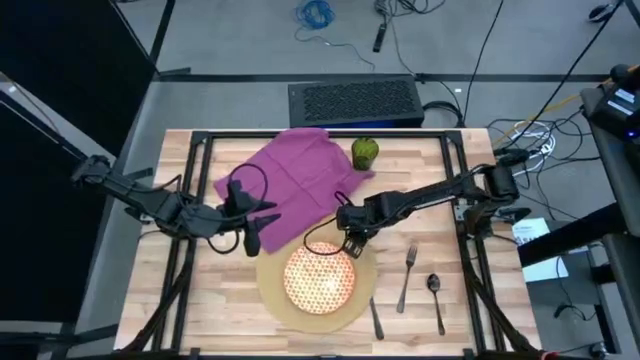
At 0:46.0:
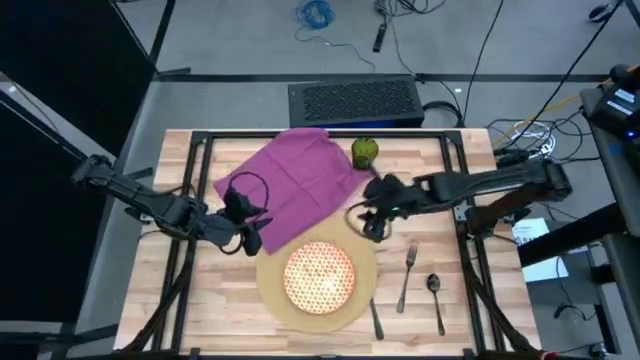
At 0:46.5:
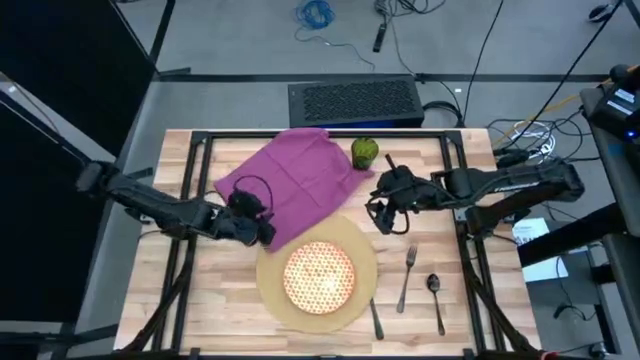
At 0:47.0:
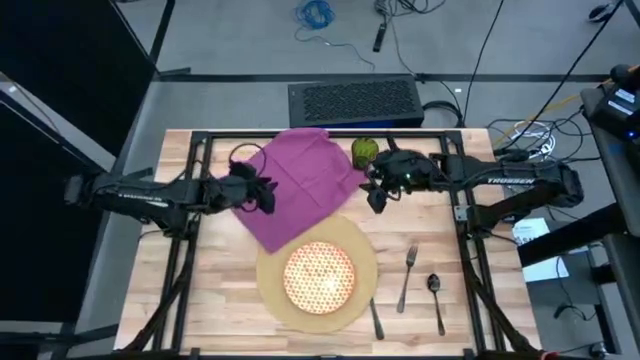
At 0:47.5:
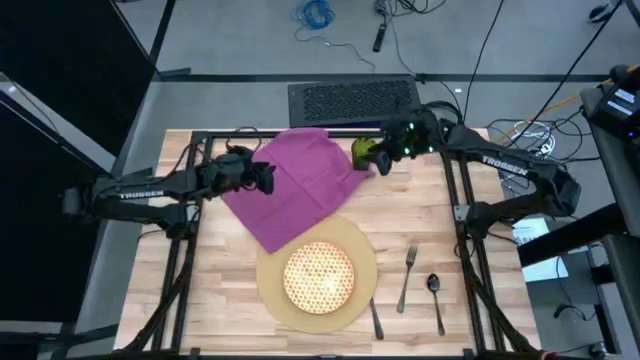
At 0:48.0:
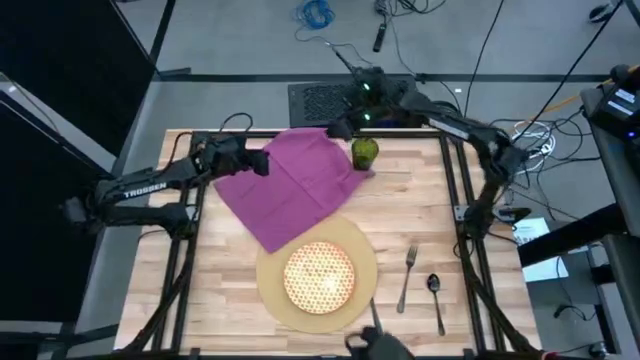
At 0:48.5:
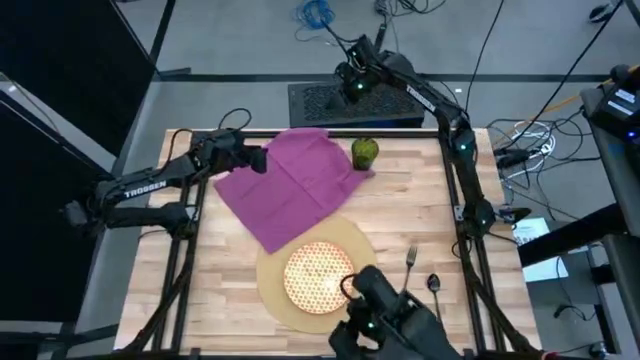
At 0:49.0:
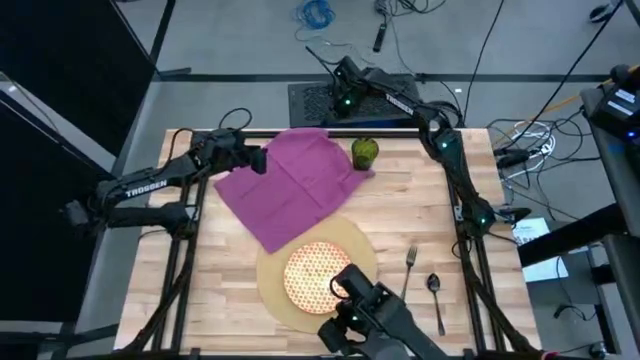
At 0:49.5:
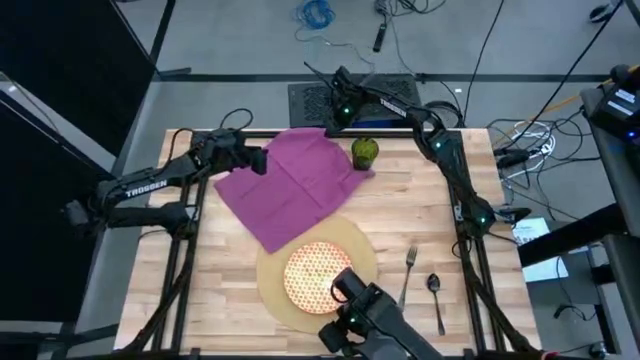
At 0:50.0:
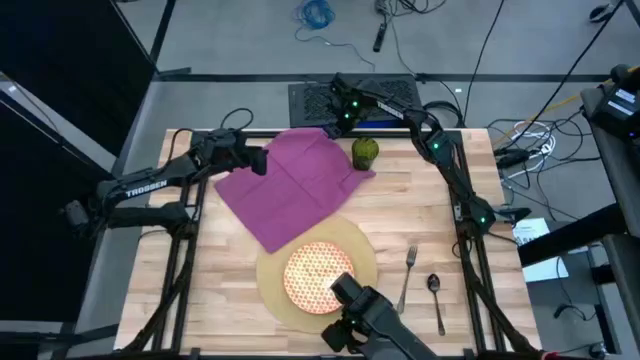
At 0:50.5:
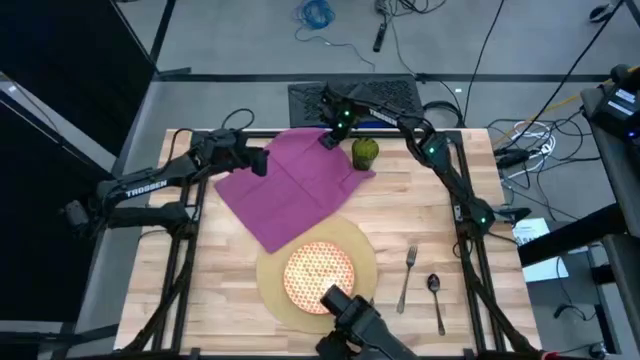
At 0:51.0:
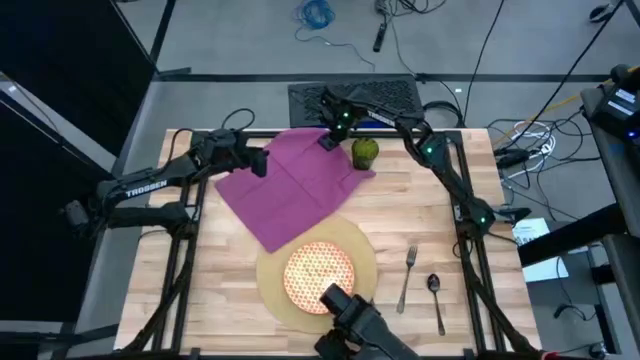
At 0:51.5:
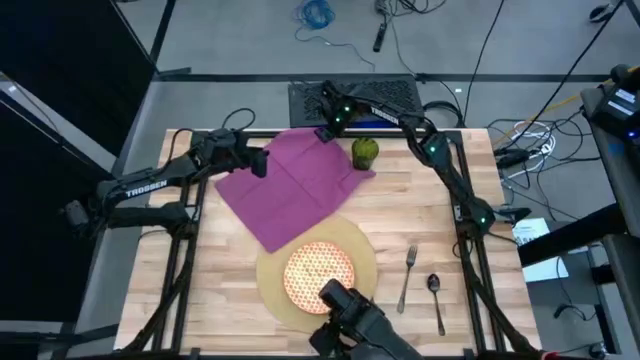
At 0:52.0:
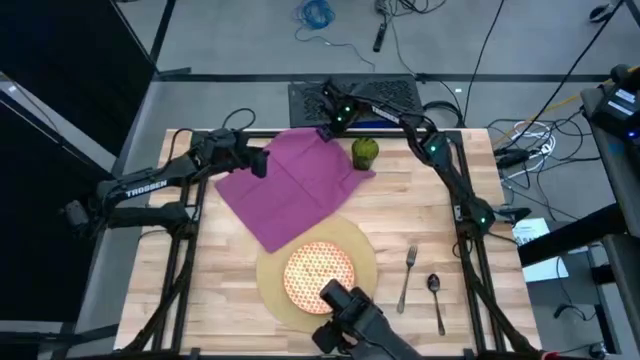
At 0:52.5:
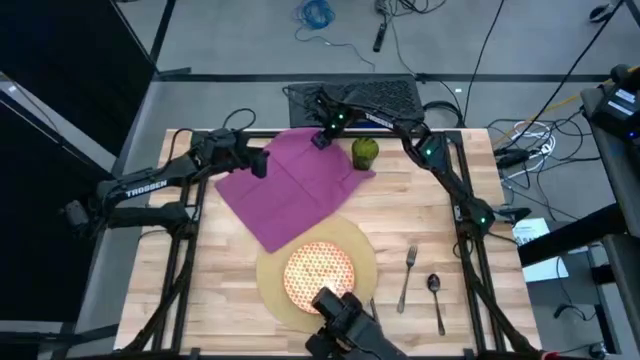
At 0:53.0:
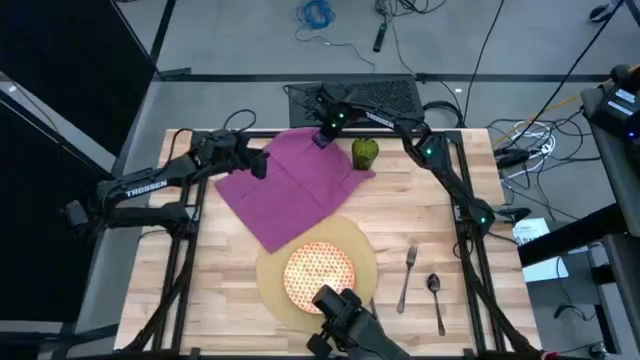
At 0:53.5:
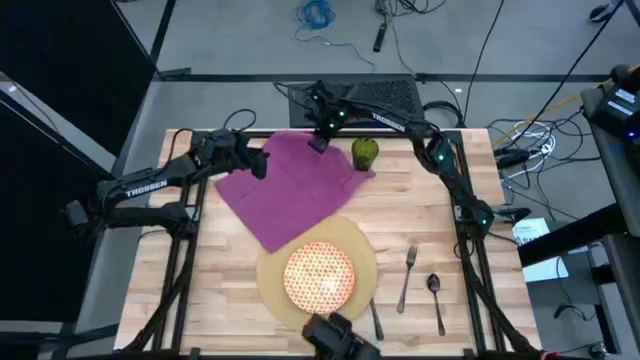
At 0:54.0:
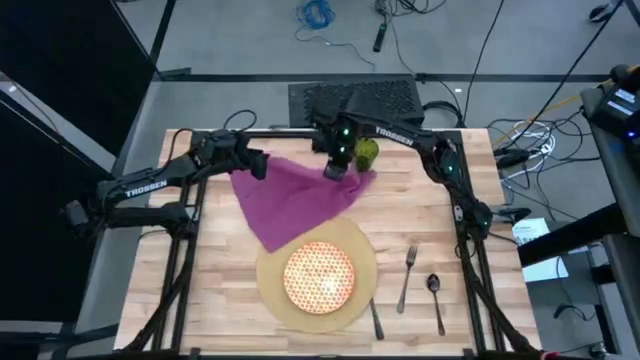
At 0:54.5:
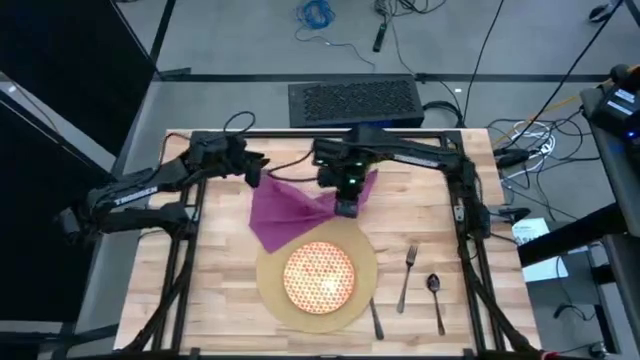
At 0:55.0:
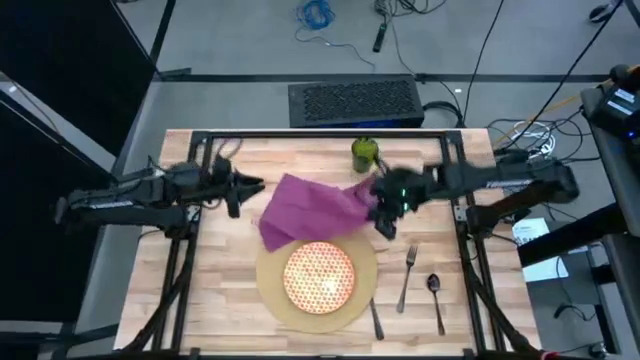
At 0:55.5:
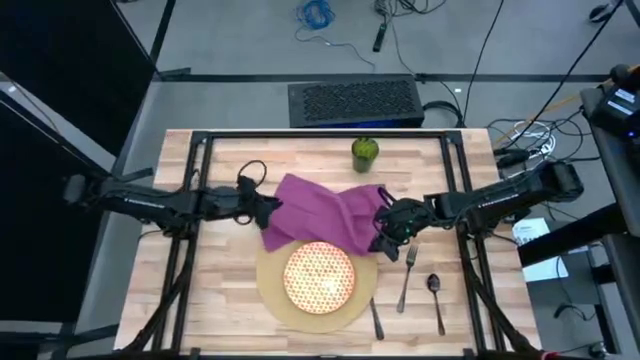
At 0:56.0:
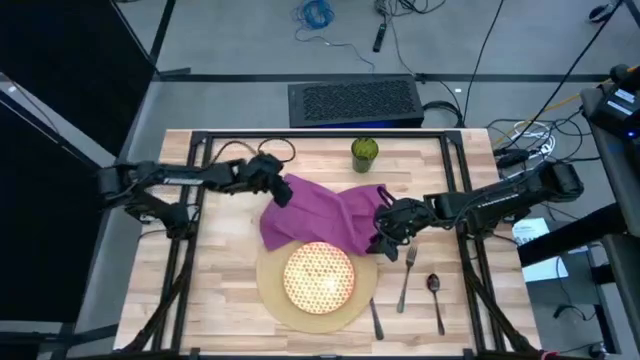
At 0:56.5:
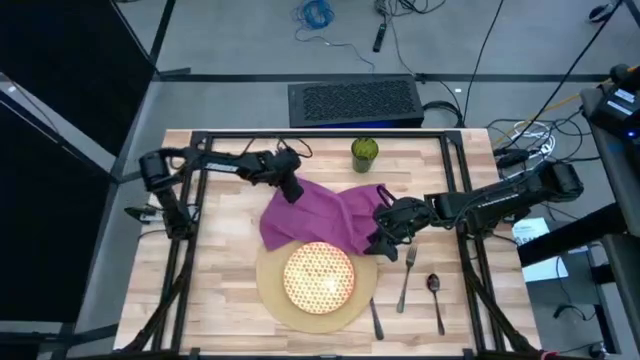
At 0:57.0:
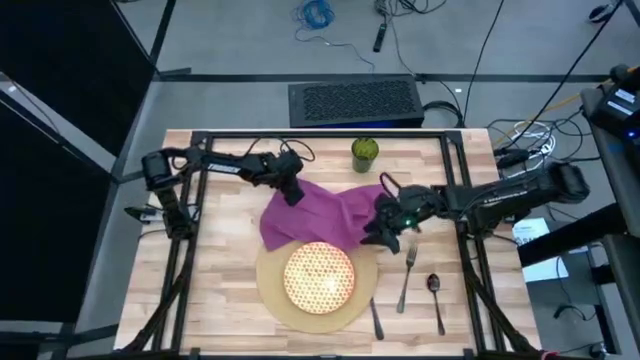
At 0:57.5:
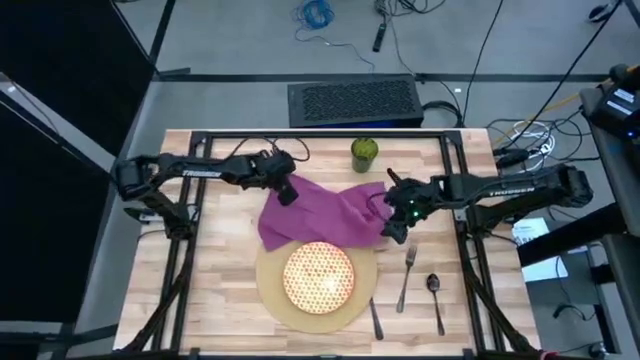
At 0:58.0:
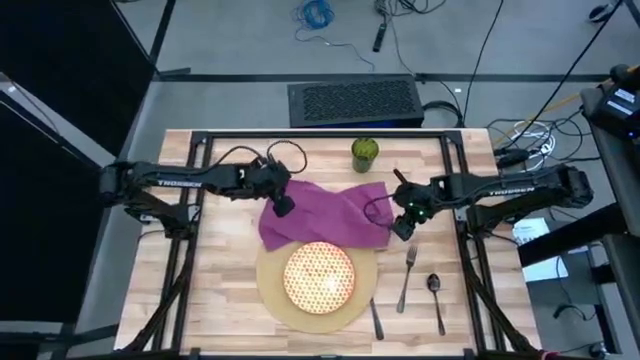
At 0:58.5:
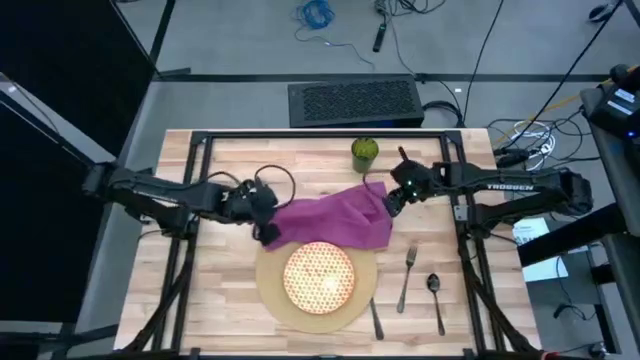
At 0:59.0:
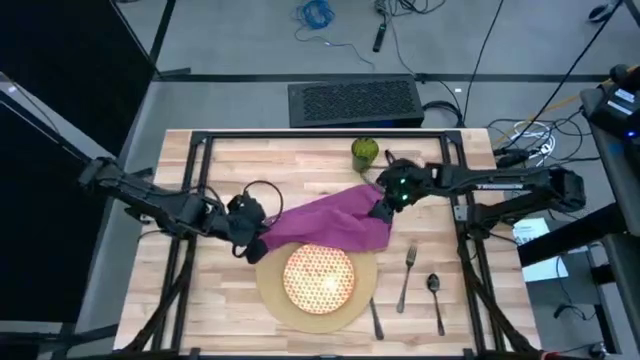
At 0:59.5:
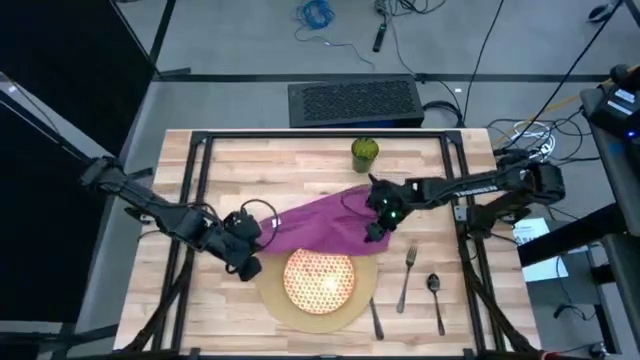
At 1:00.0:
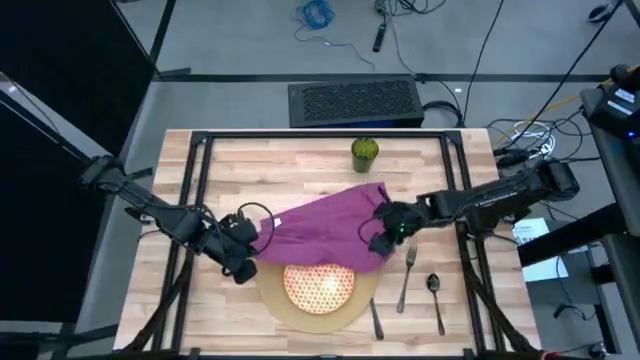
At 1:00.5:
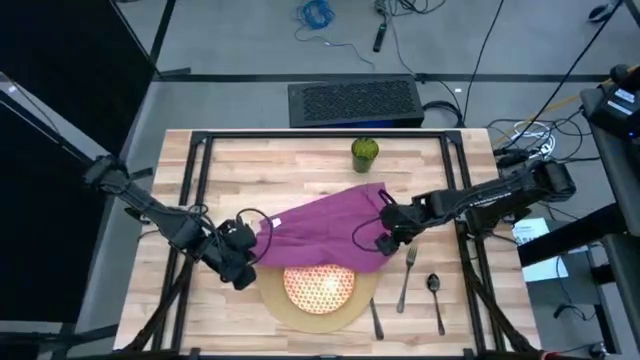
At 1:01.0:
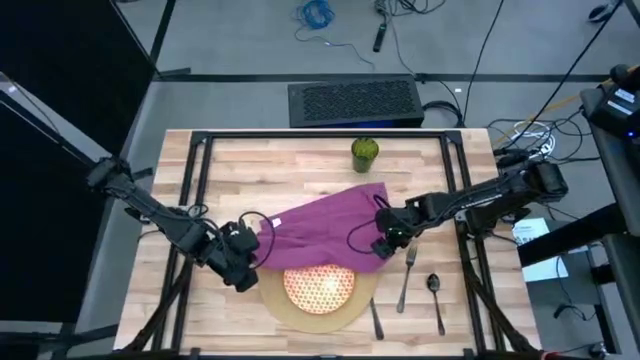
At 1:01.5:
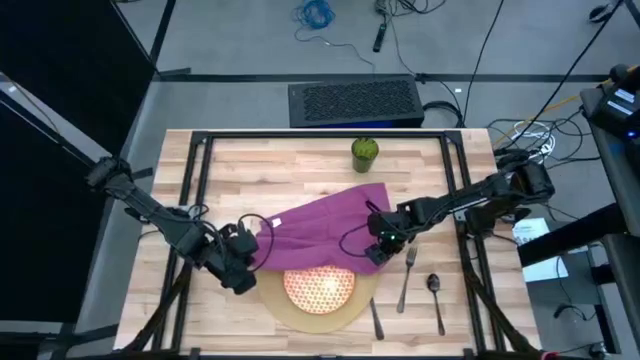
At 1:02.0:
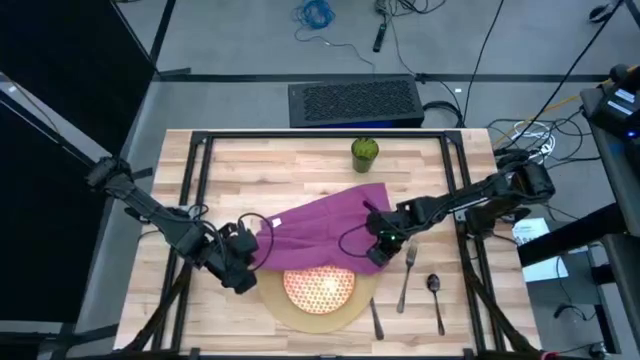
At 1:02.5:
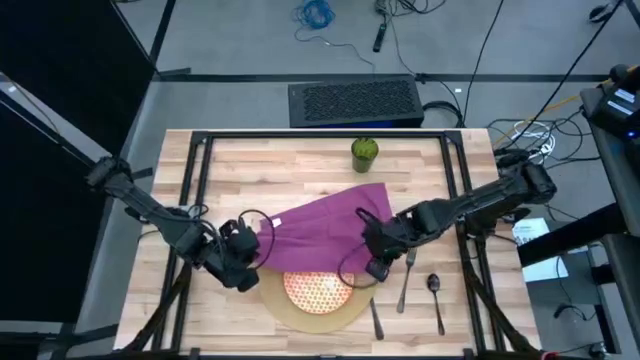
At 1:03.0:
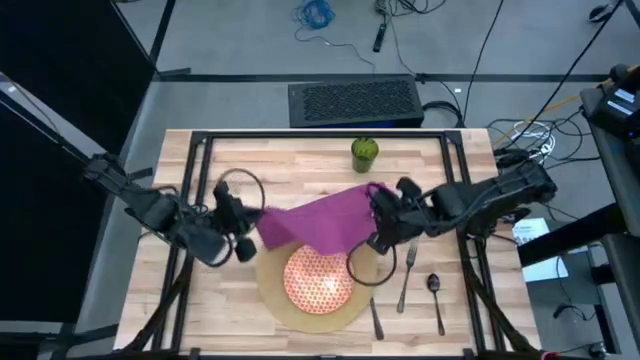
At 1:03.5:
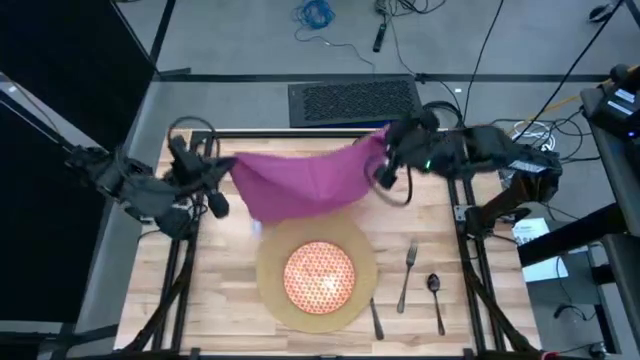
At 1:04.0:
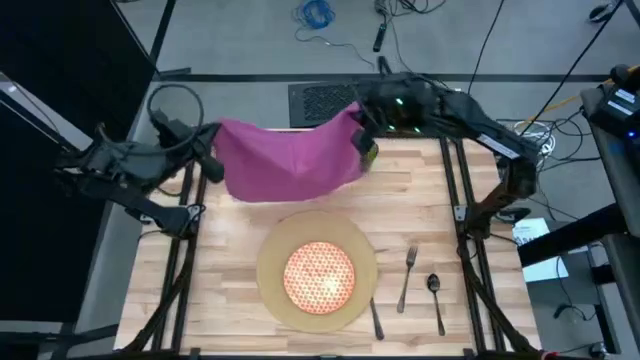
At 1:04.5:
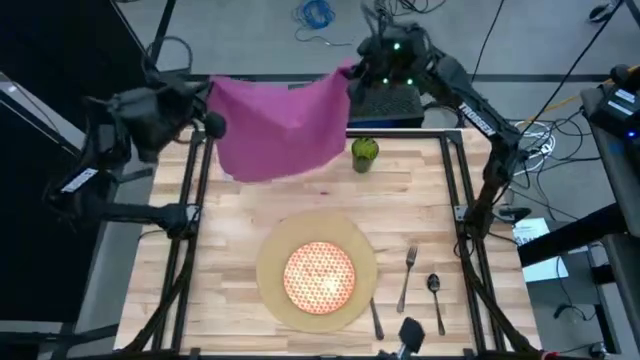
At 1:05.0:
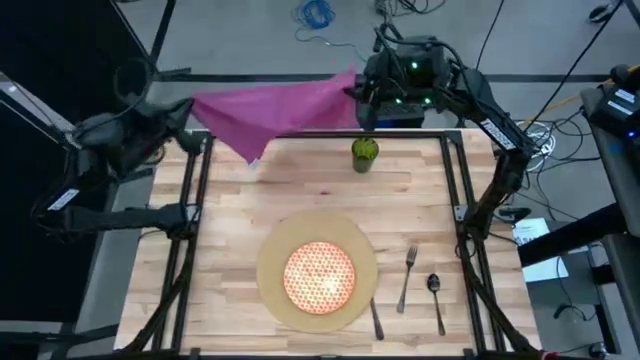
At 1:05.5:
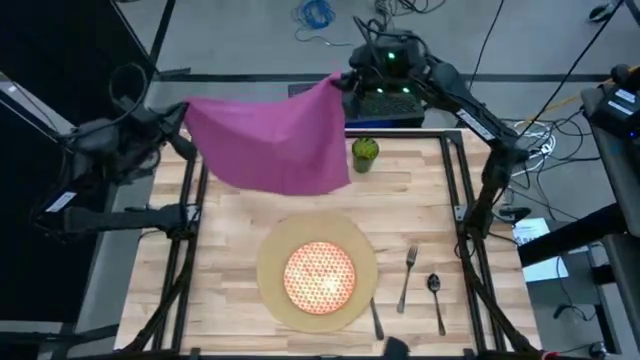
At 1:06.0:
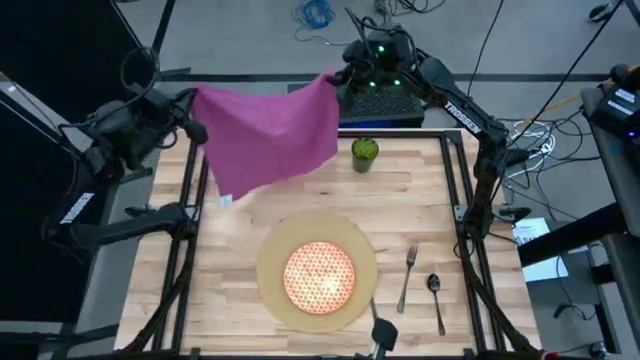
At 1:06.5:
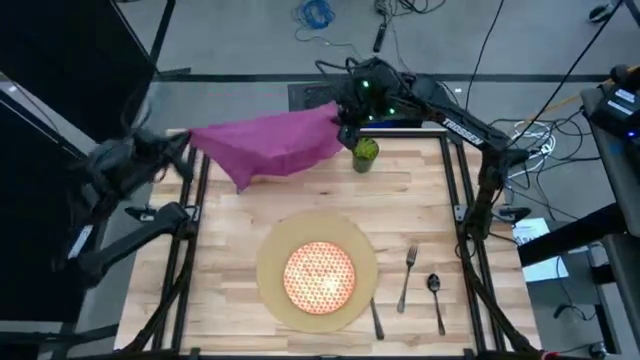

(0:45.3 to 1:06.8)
Task: Set table place
Fold the purple table napkin
